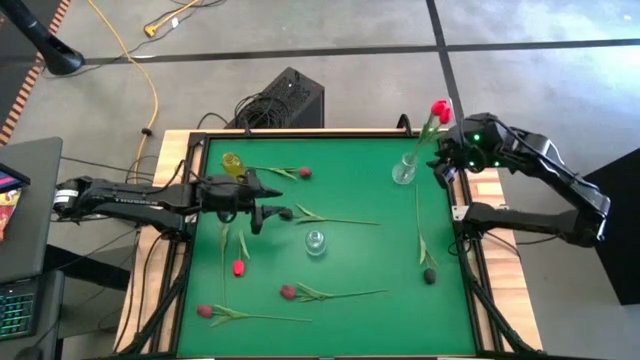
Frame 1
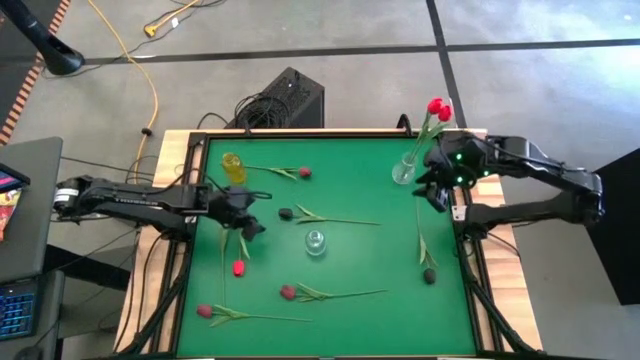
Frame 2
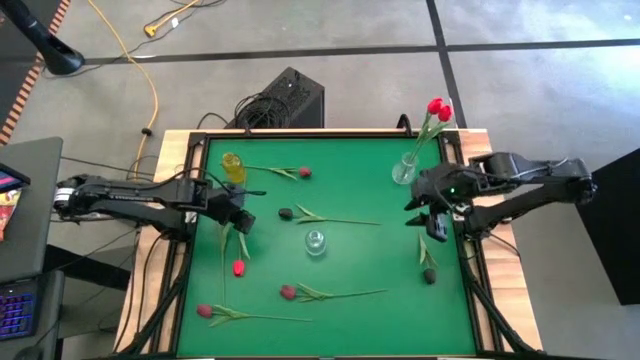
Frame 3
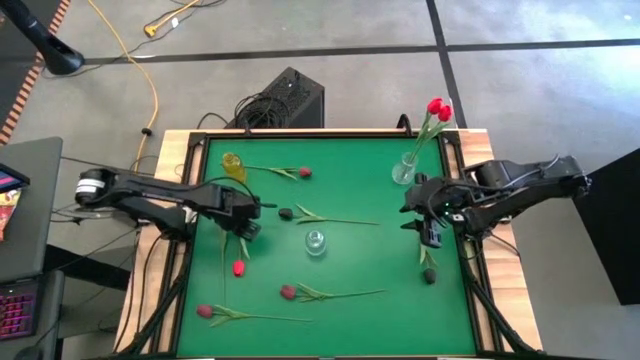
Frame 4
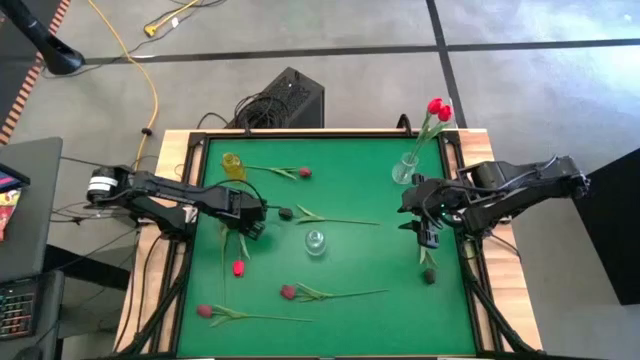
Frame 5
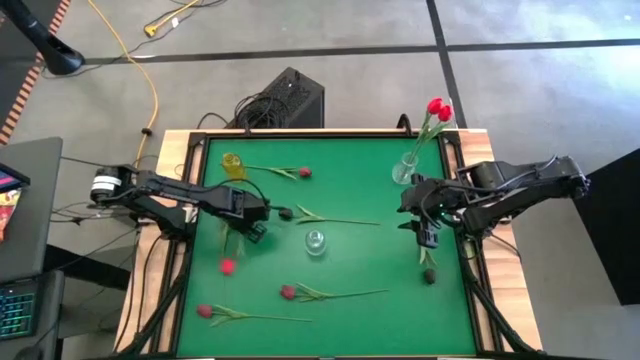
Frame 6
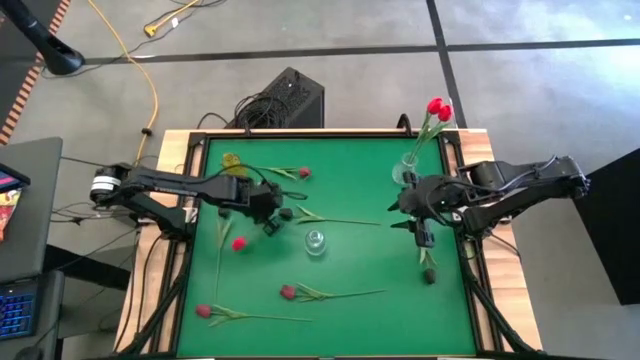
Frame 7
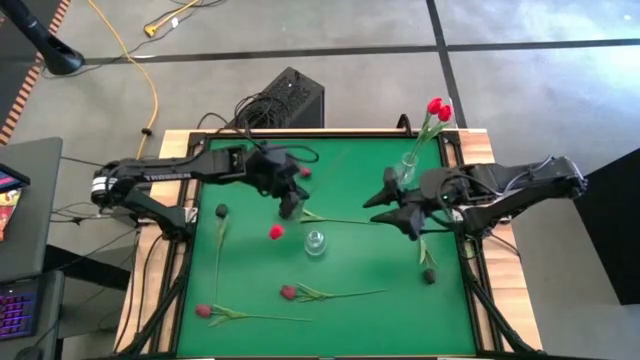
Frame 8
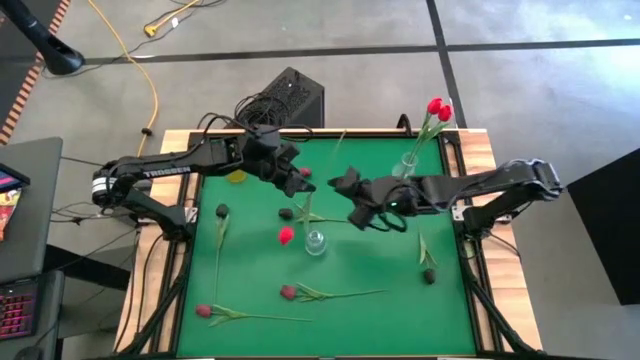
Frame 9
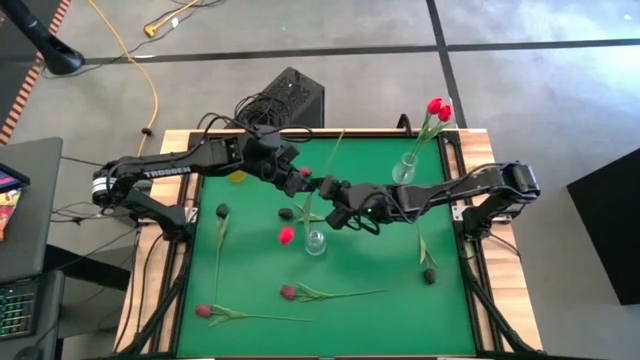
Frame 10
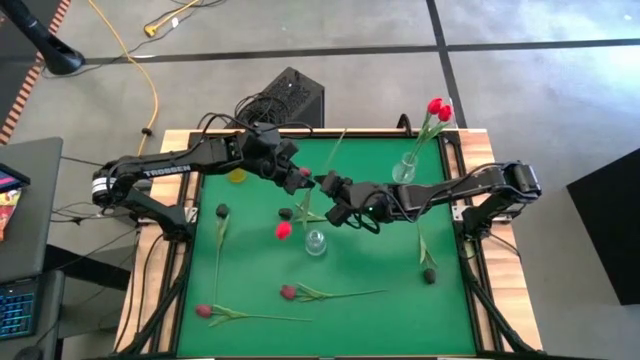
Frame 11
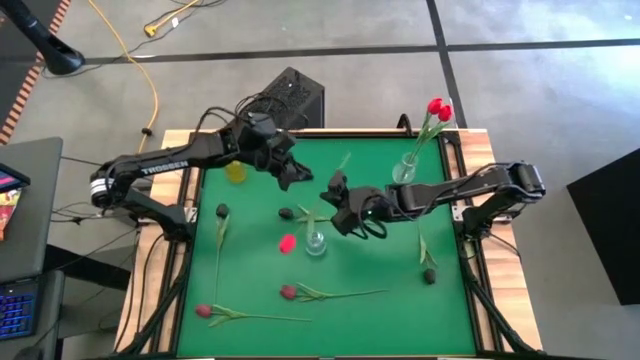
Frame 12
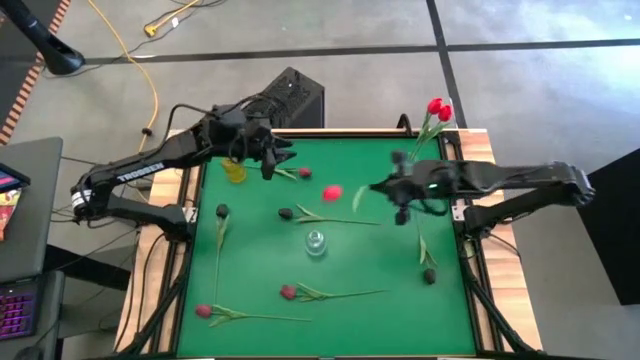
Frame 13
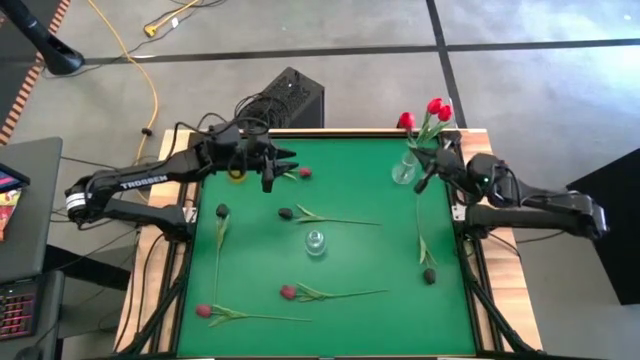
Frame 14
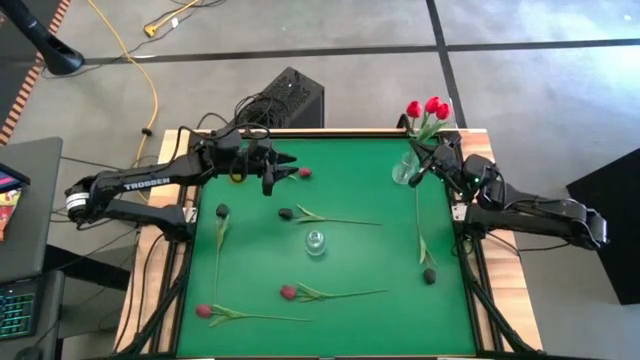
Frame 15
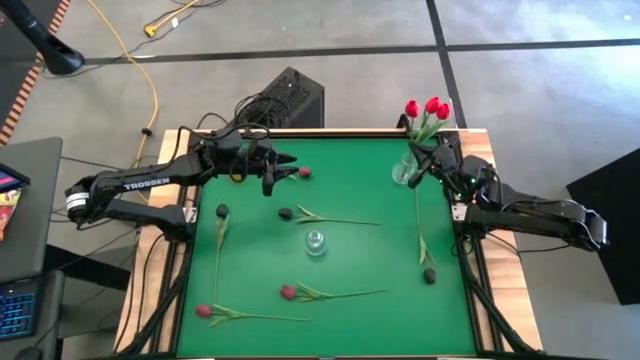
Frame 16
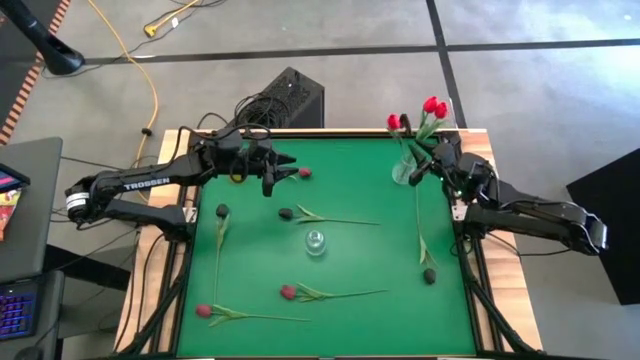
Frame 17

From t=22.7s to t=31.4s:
Task: Sort flowers into vase by color
Put the red tulip into the right transparent vase

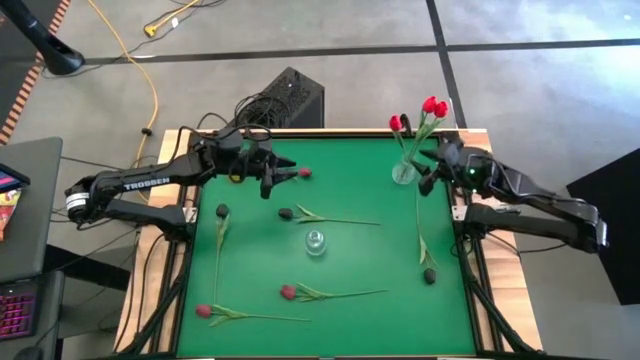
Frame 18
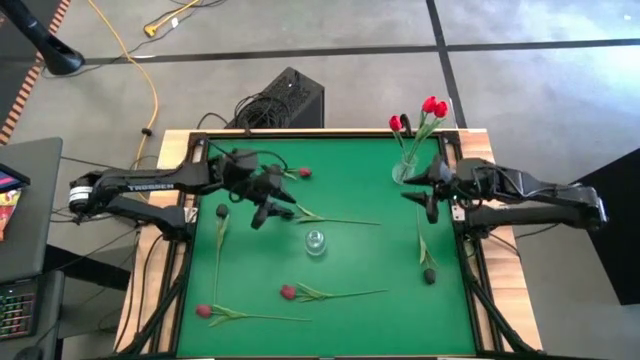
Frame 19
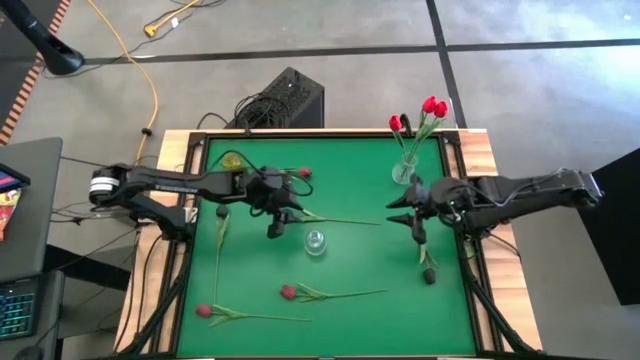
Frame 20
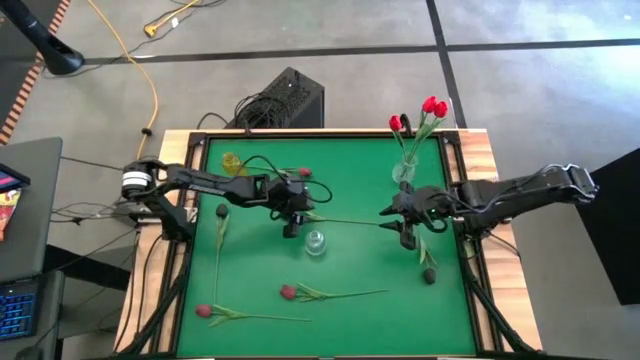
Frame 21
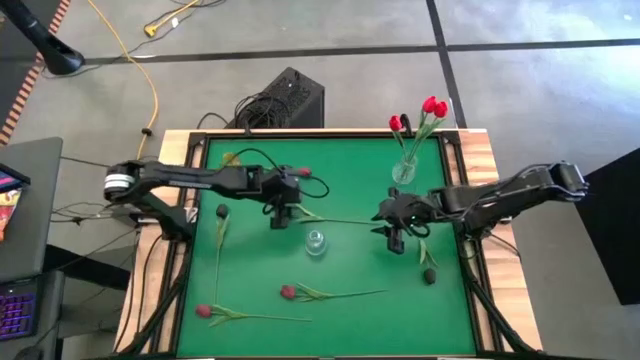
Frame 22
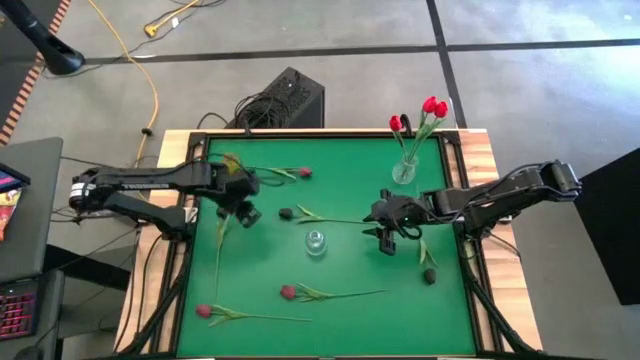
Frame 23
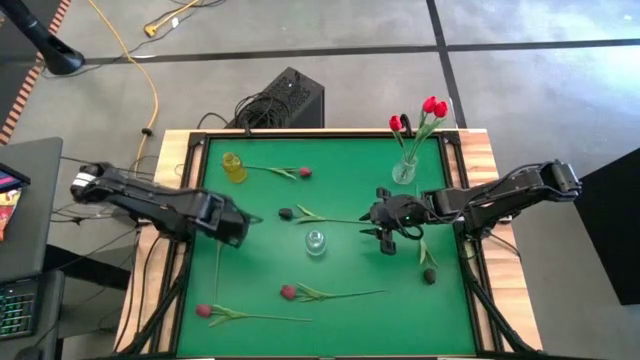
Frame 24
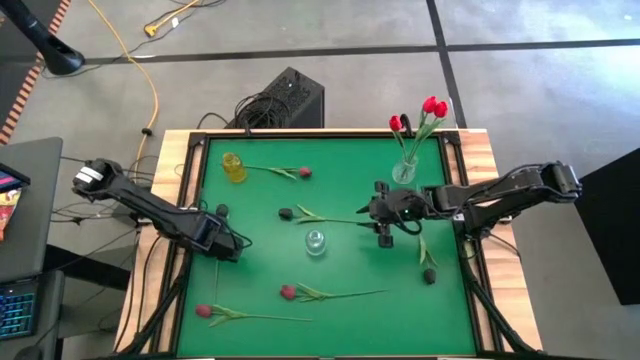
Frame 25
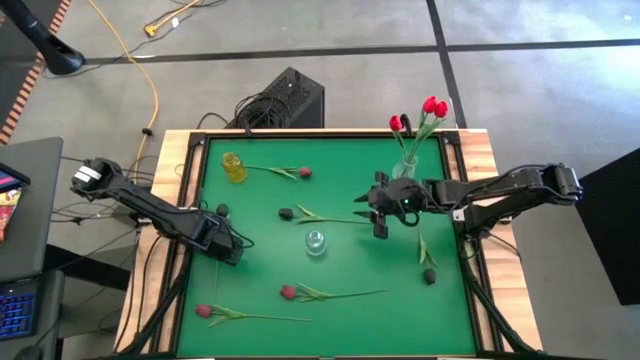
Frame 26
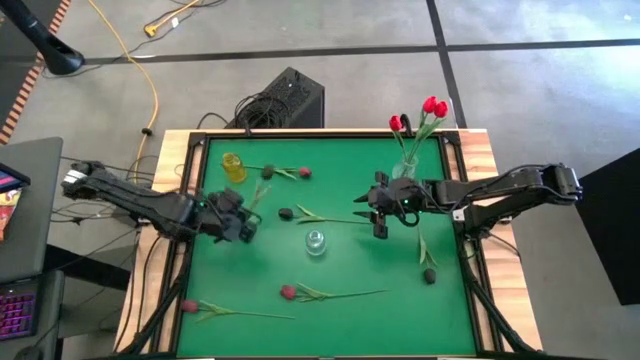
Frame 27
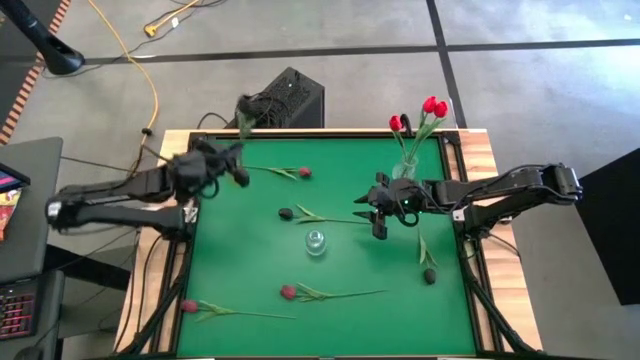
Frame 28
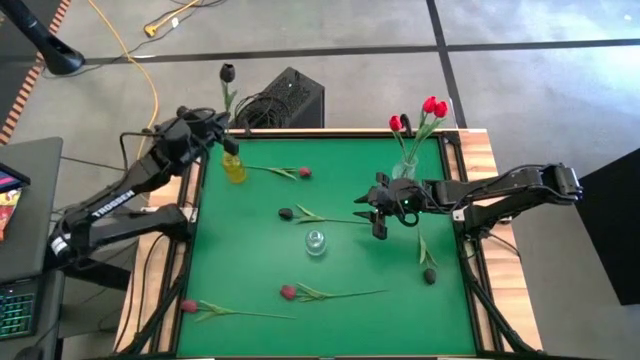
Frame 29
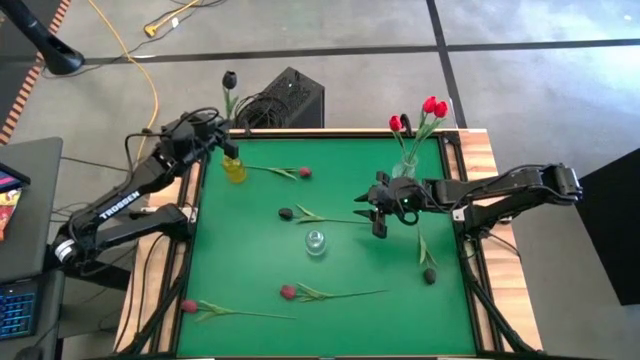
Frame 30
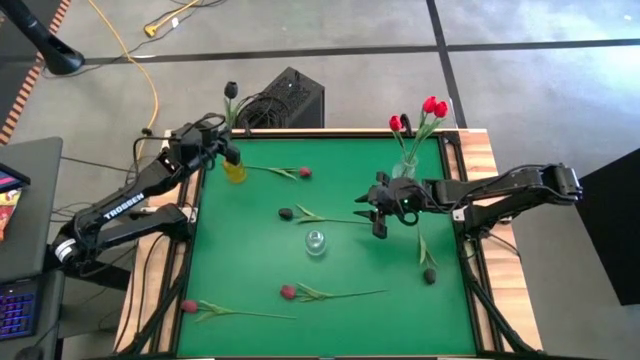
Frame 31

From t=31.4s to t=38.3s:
Put the left black tulip into the yellow vase

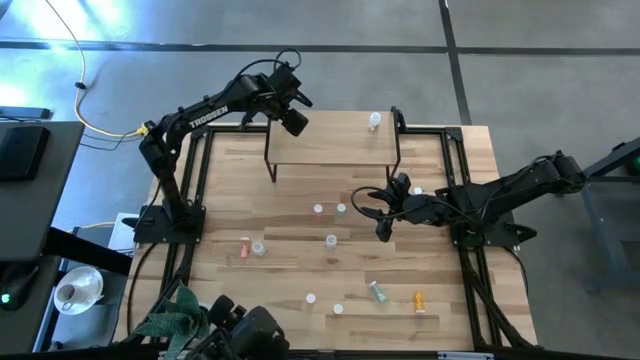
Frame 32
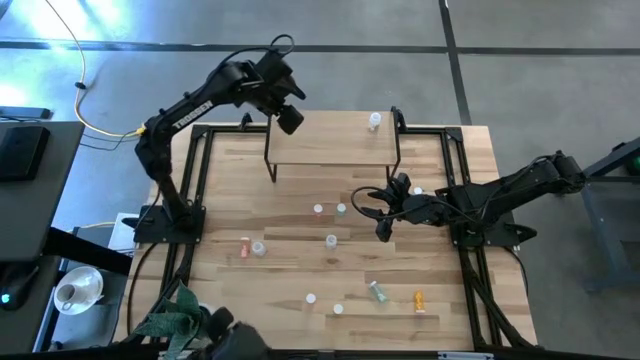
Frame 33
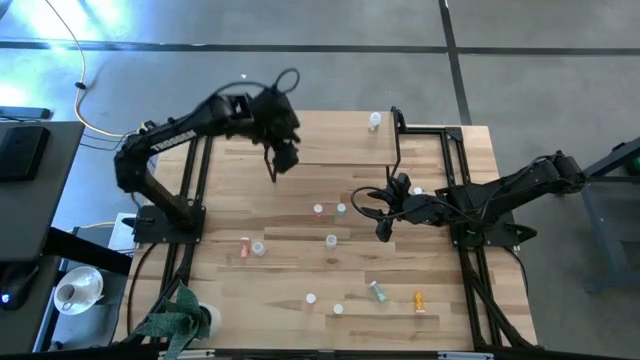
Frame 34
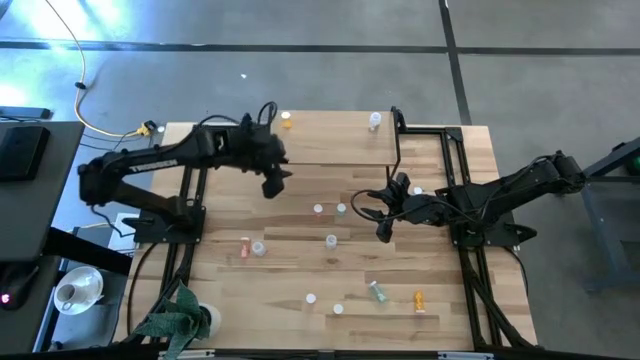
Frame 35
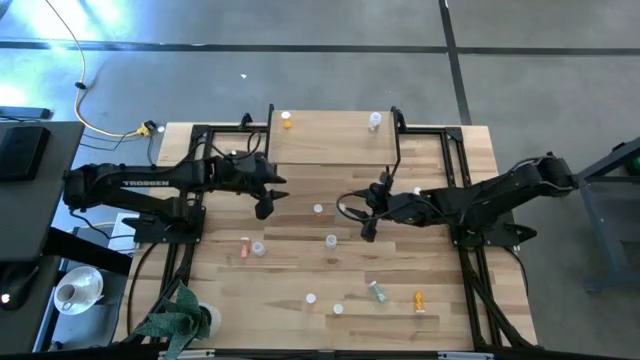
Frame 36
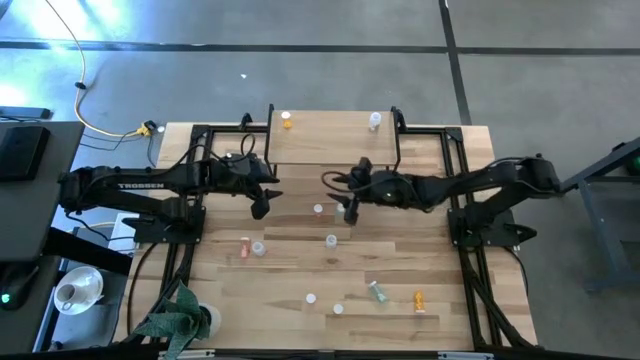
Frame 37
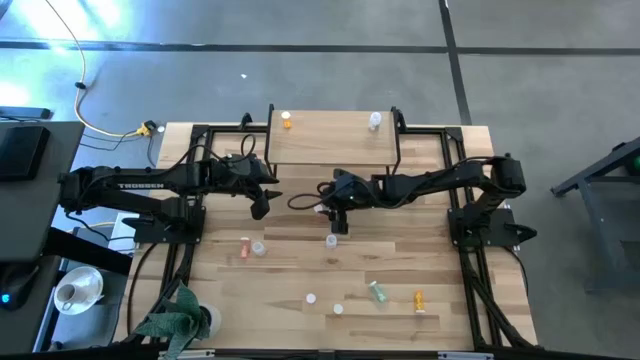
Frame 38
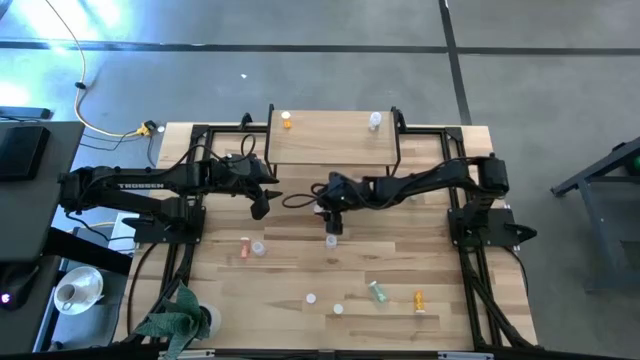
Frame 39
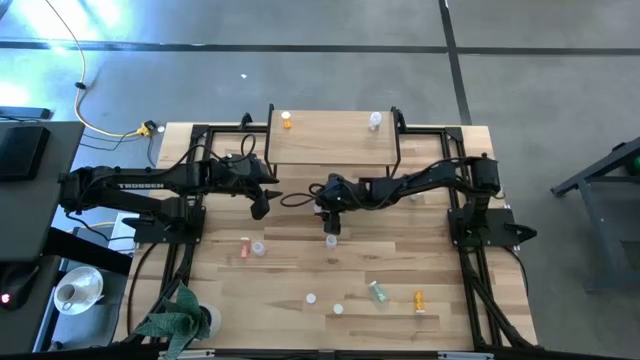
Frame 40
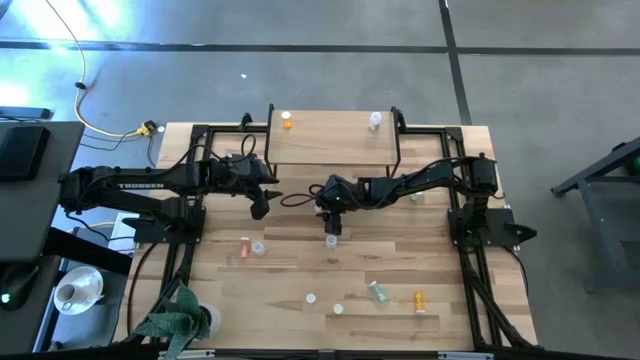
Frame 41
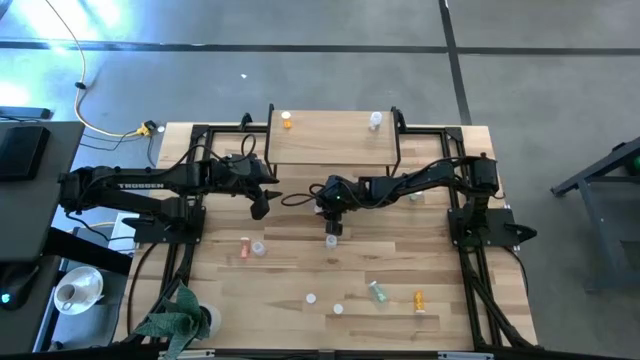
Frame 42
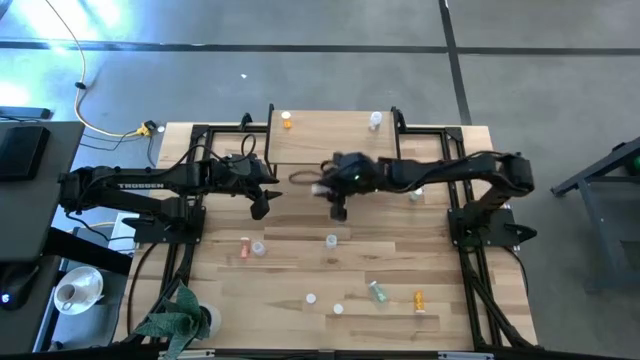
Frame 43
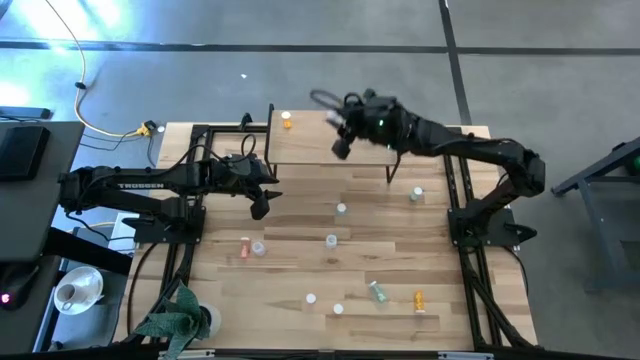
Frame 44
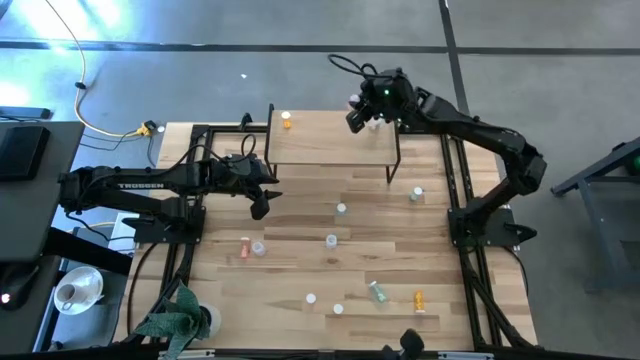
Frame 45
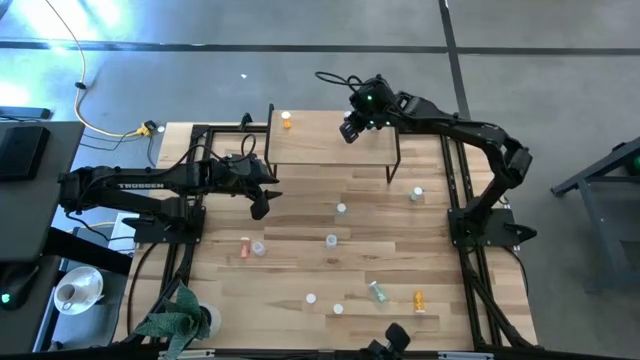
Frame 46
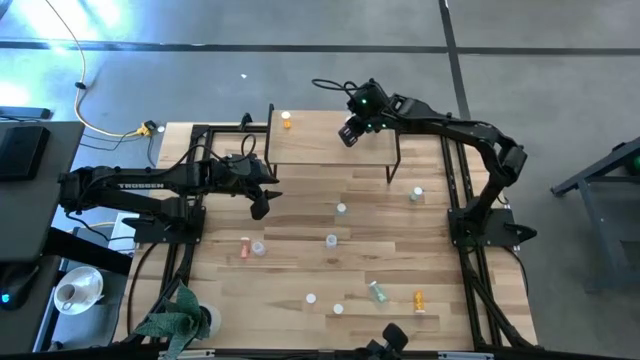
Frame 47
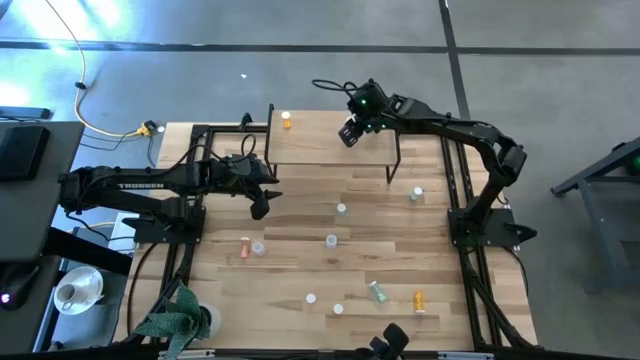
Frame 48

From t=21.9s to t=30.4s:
Task: Pick and place medicine bottles onto shelf by color
Put the top right pink pill bottle on the shelf
